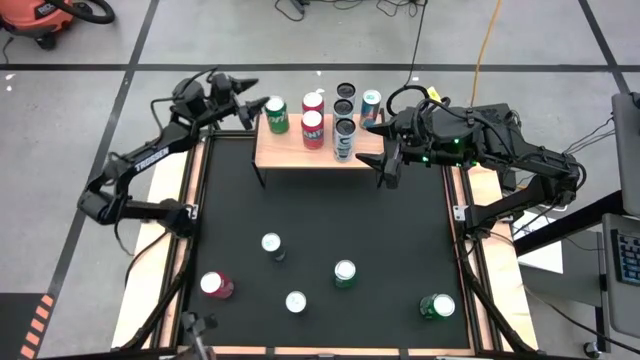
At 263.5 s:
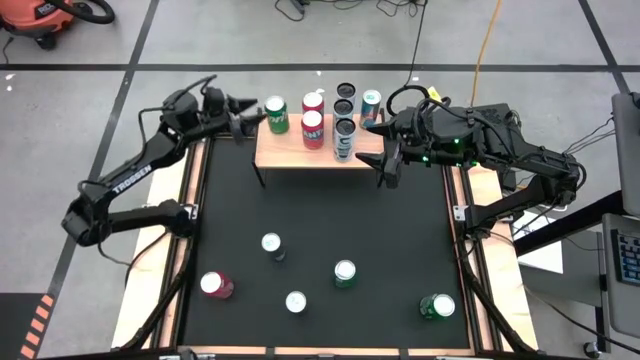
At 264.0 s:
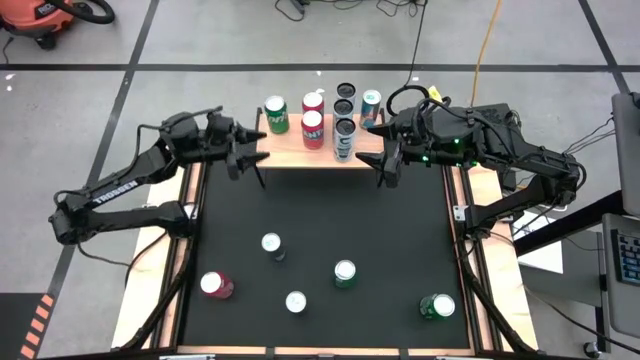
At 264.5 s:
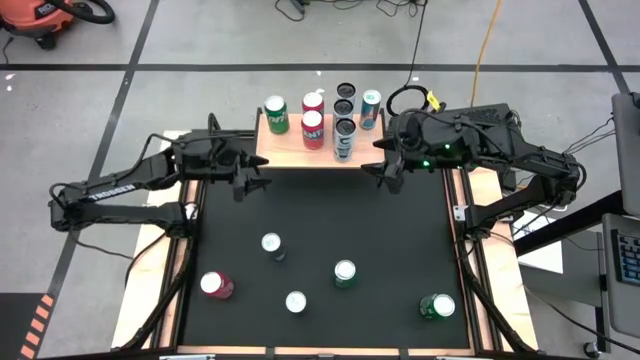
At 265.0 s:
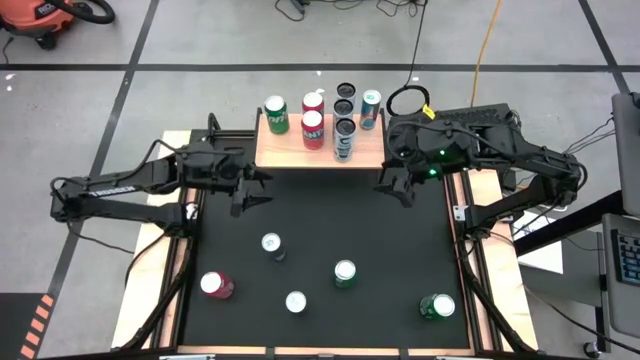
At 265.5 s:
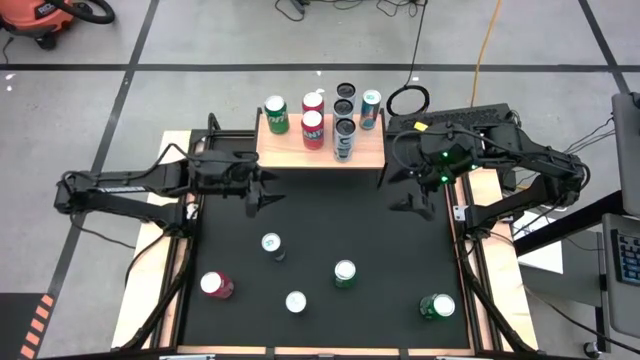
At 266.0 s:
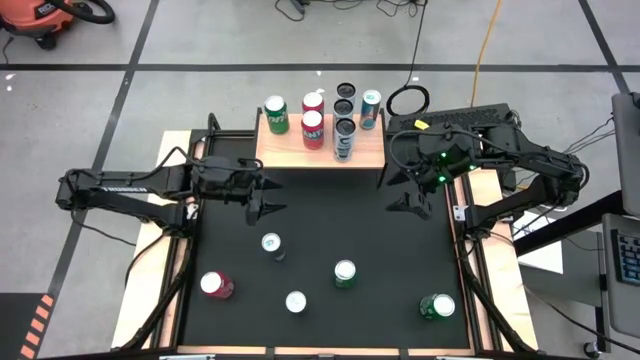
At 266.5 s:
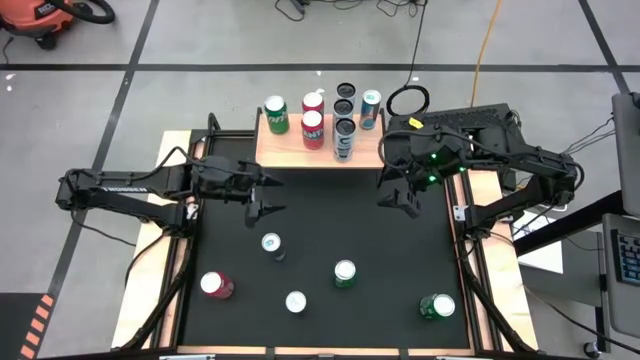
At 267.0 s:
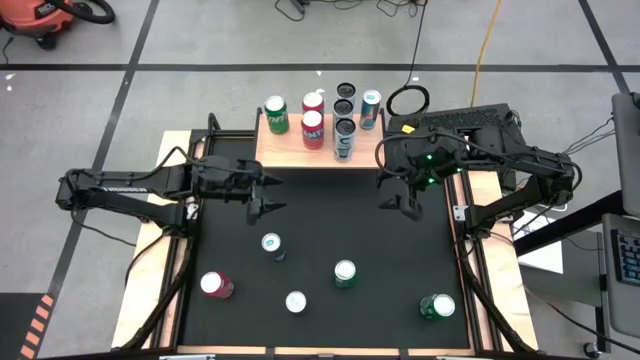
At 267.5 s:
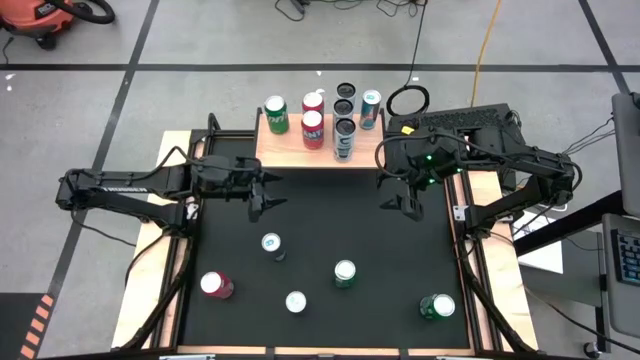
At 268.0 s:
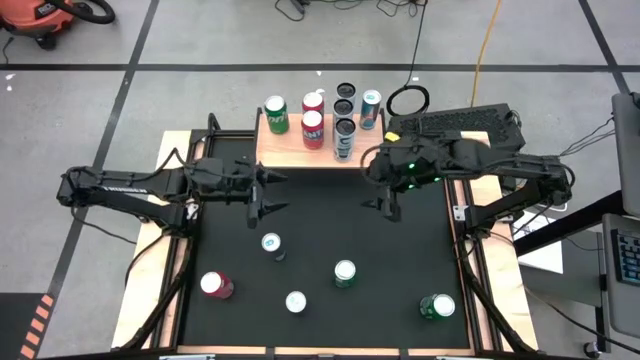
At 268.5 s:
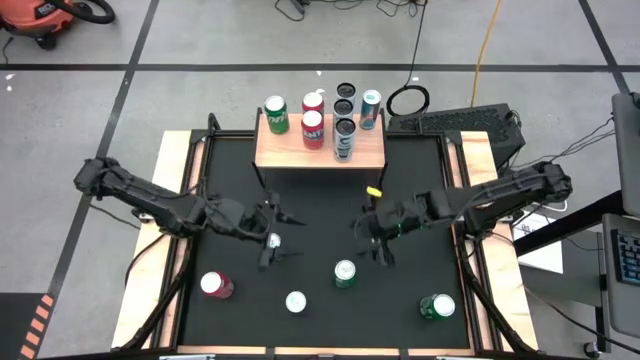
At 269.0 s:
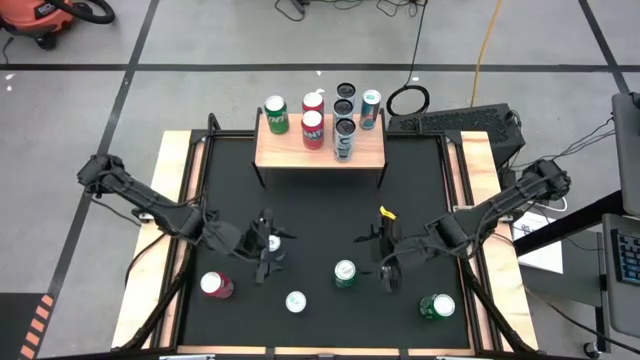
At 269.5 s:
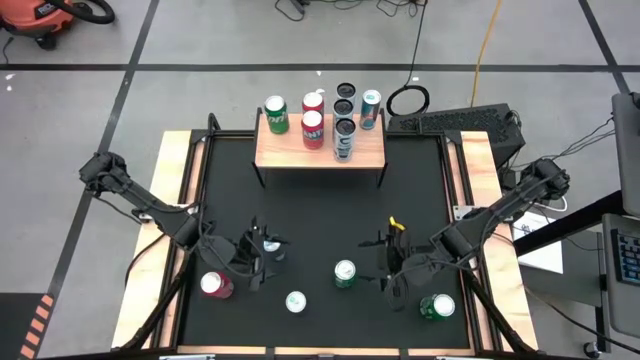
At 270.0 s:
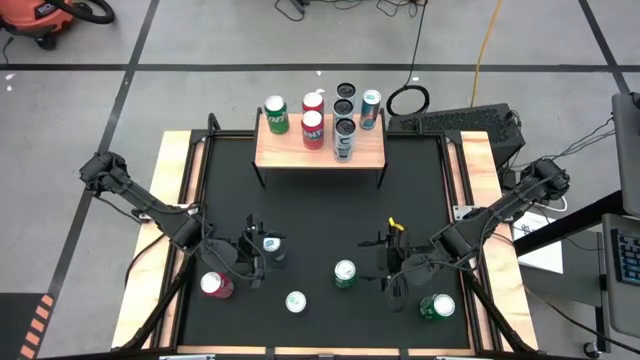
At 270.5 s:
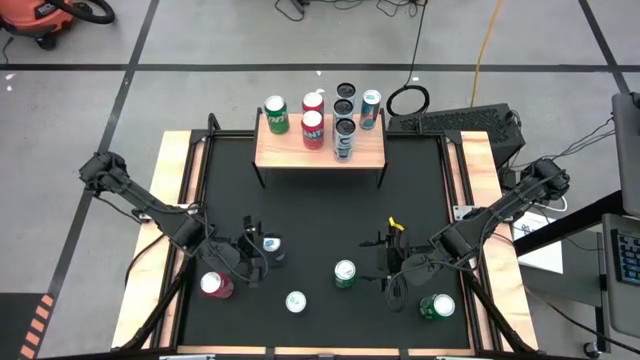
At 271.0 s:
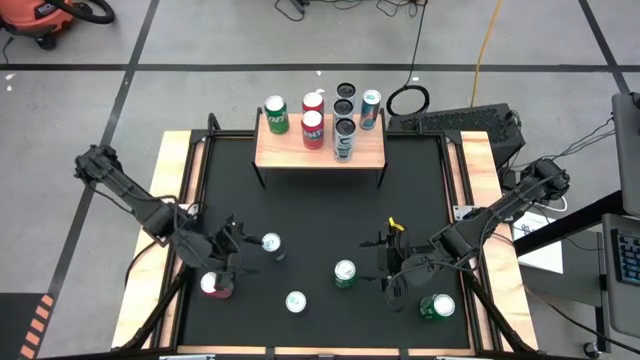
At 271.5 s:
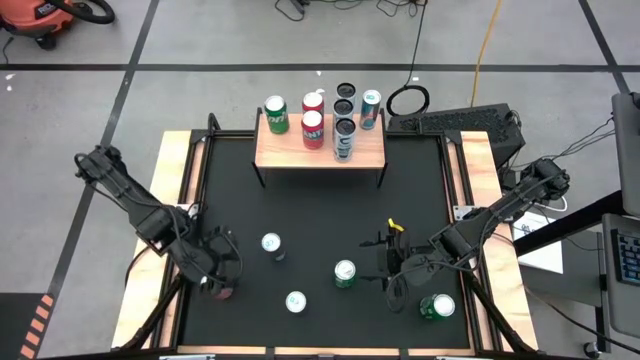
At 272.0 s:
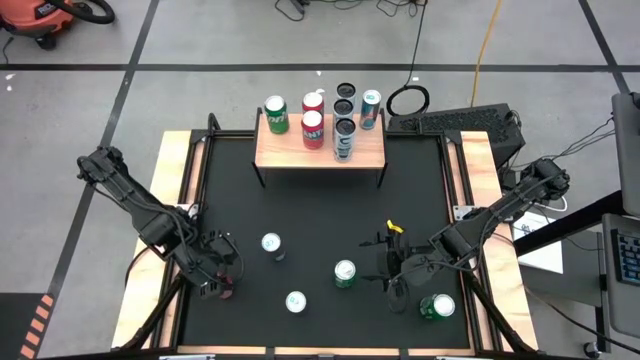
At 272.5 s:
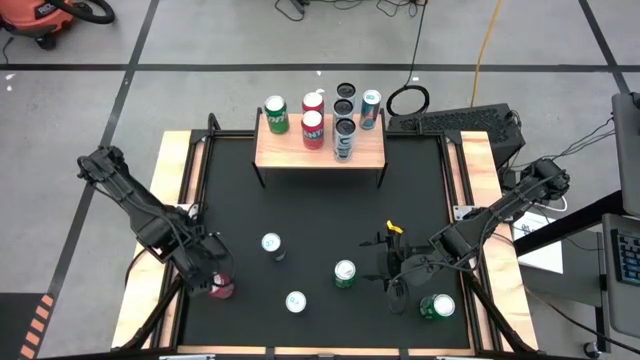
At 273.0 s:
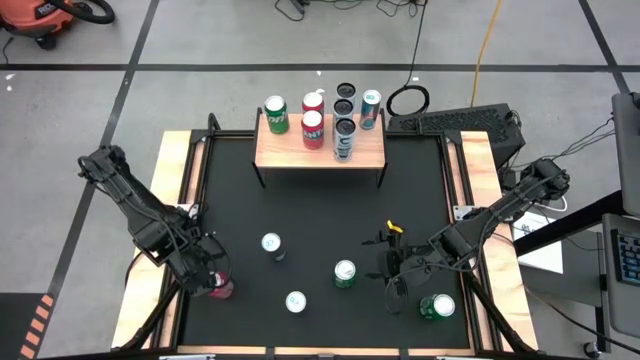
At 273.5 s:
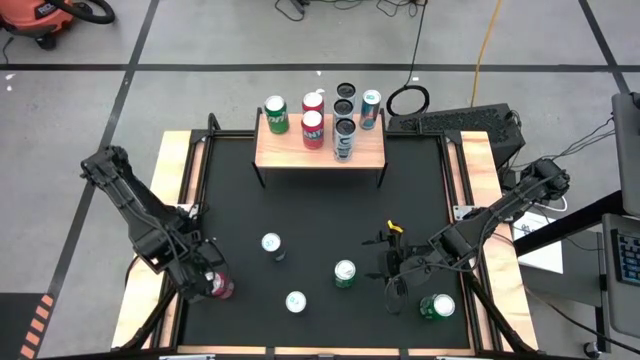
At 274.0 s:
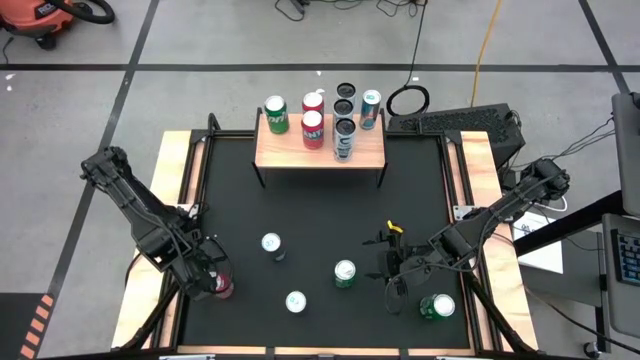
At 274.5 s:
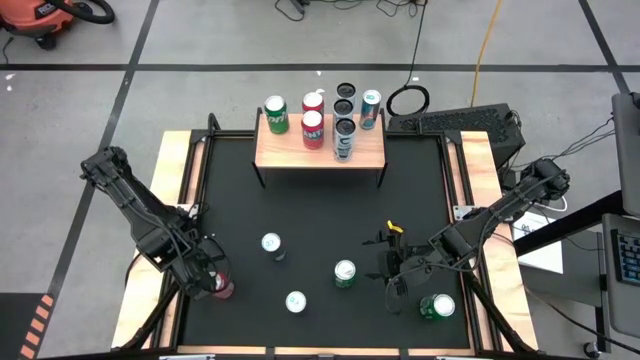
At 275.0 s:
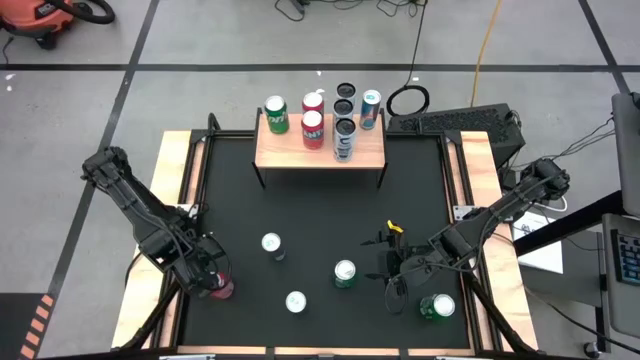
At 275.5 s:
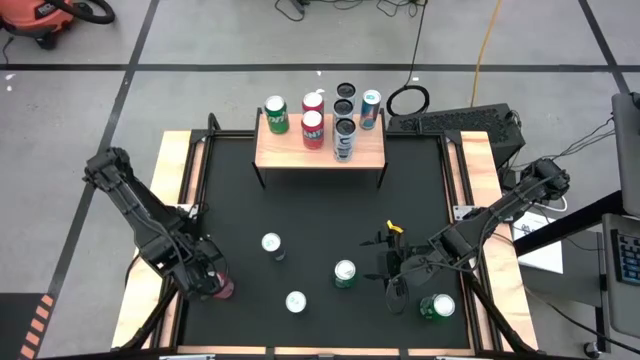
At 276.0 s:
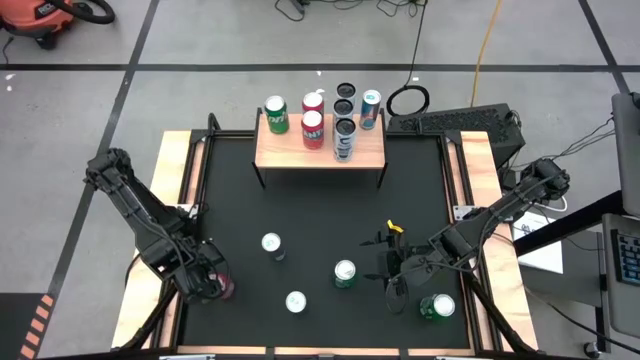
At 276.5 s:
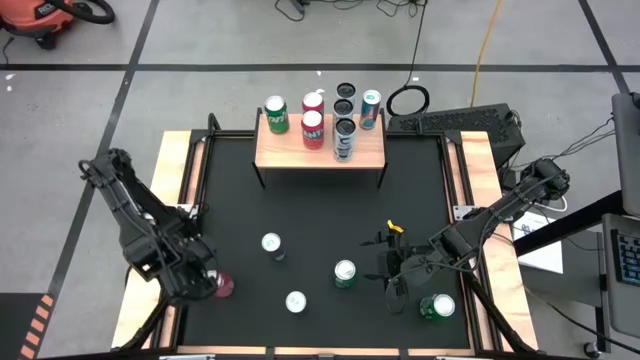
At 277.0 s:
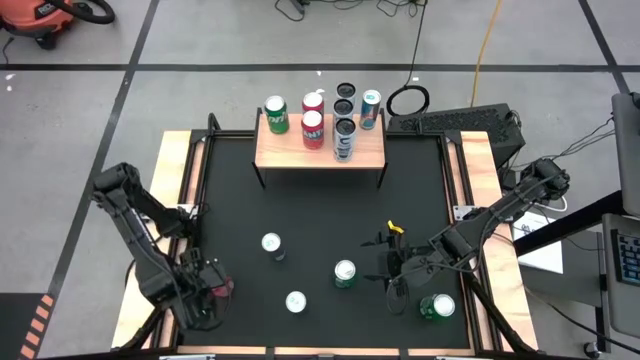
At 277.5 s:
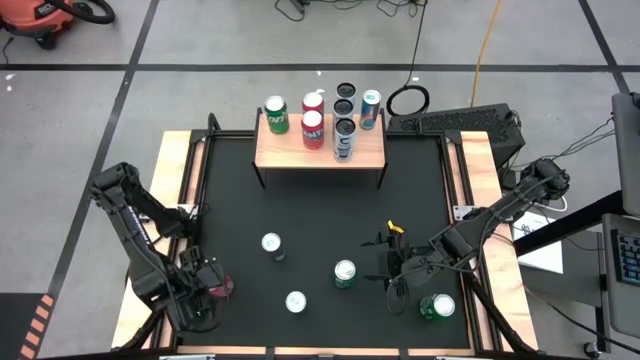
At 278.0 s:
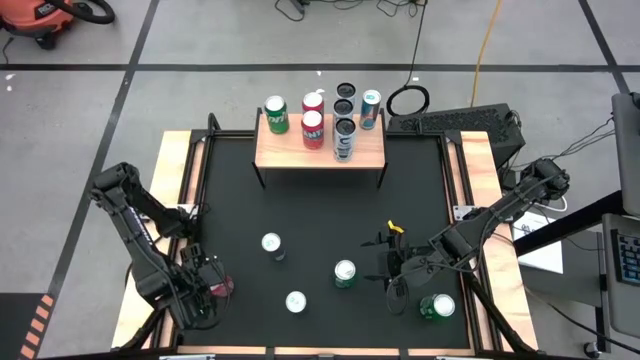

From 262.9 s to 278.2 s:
Task: Place canned beverage on shelf
Put the orange soda can on the shelf aligned with the other orange soda can

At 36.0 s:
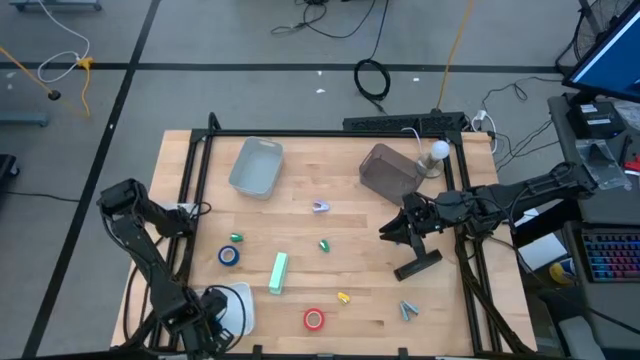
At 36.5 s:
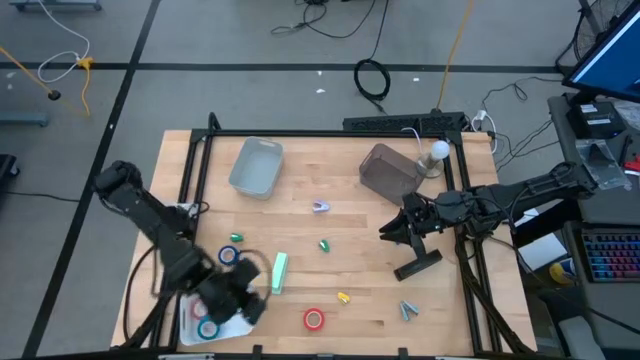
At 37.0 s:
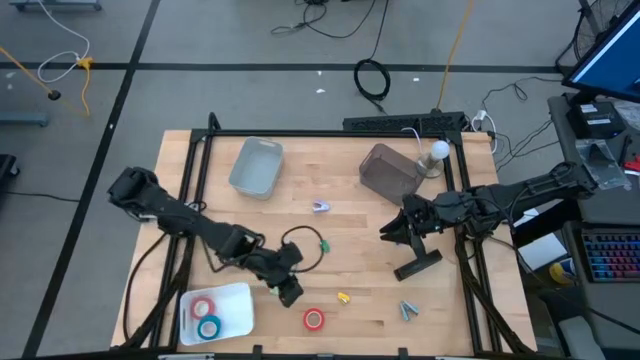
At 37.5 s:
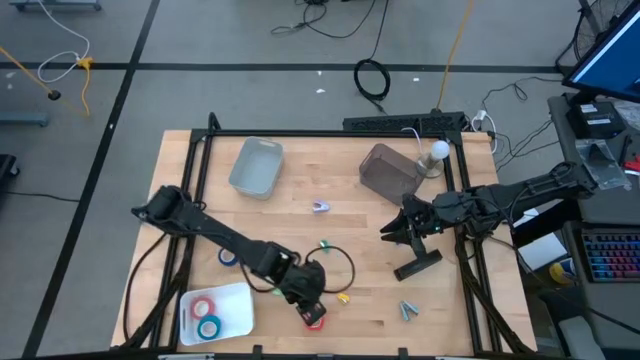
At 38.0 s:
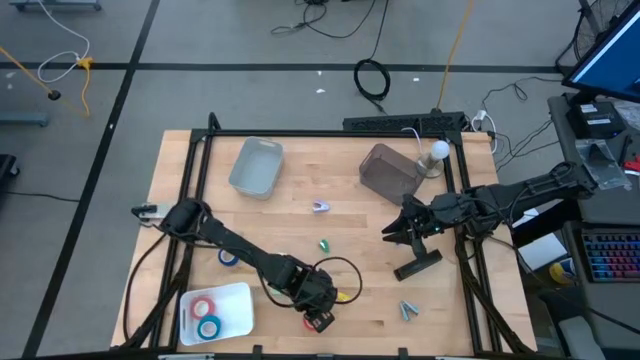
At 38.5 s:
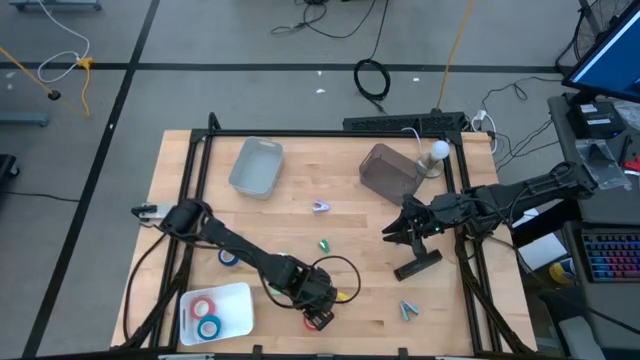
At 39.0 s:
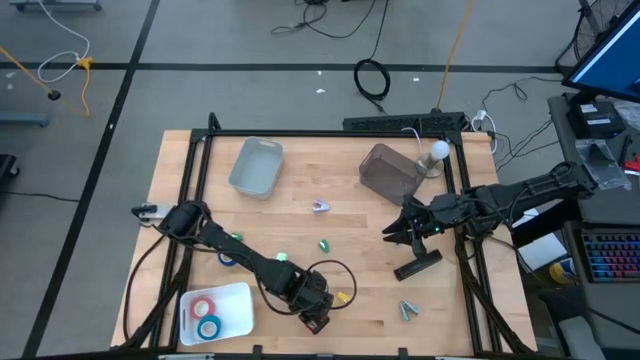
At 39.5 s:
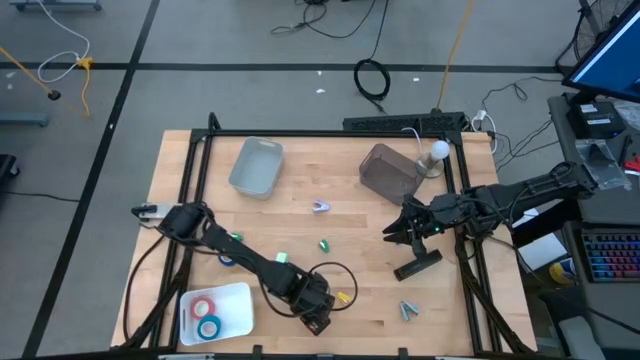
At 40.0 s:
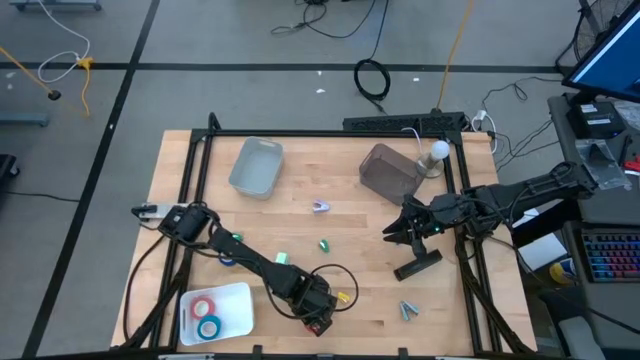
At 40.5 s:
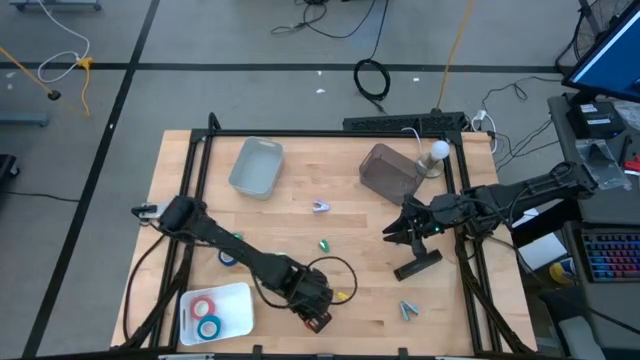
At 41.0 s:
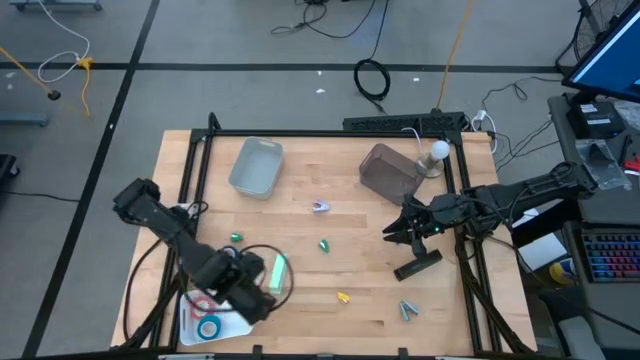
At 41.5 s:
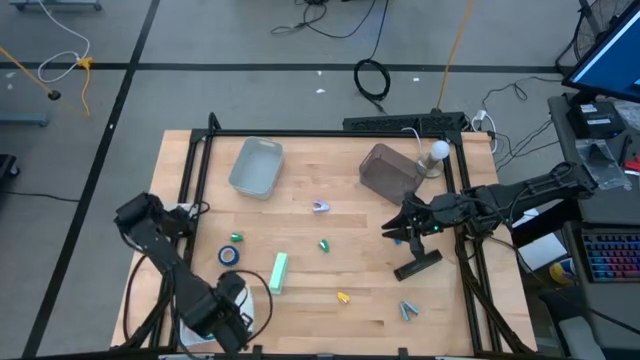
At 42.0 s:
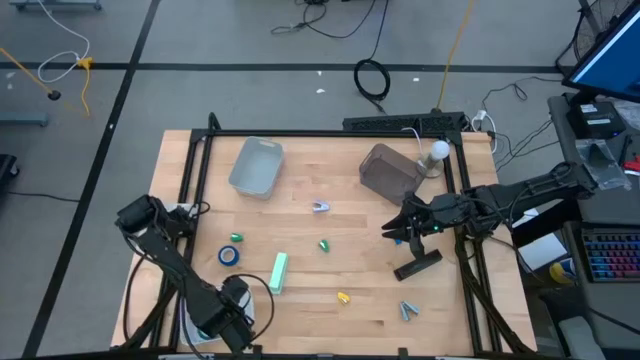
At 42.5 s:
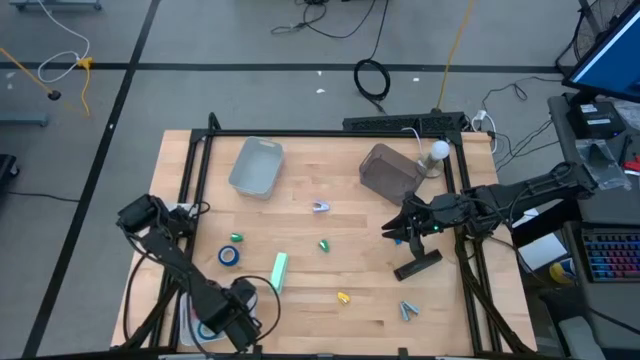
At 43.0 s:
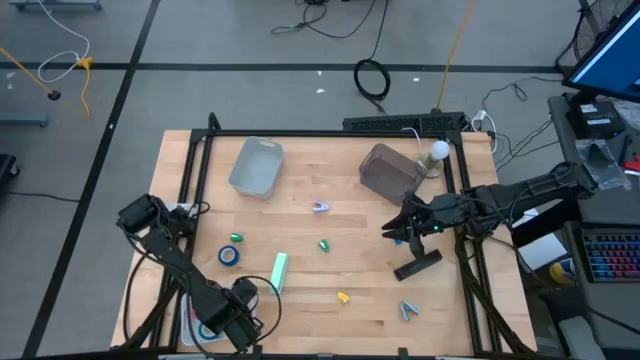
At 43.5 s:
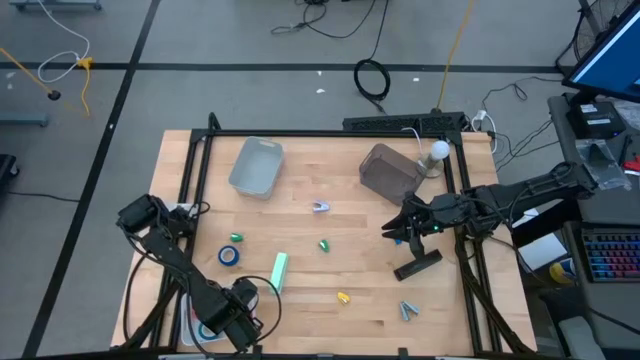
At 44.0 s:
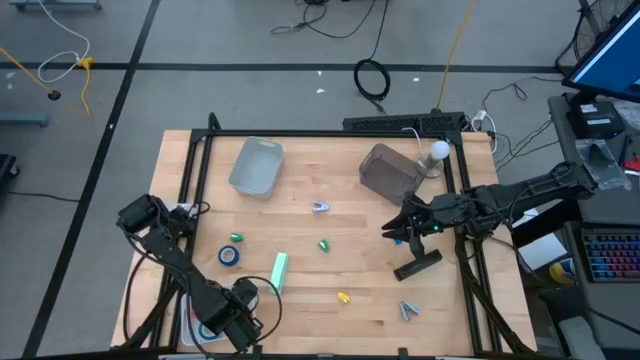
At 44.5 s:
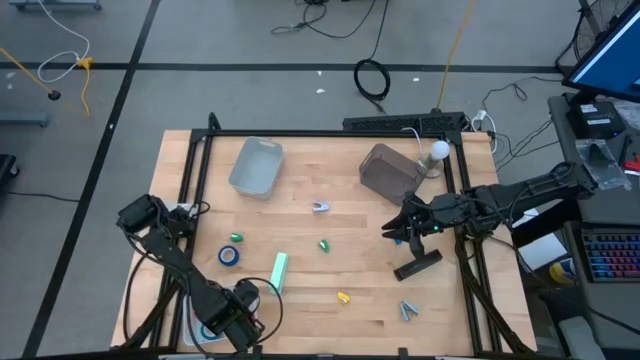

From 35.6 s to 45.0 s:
Task: Pick and place Stapler, Stapler remover, tape
Put the red tape into the white bin
